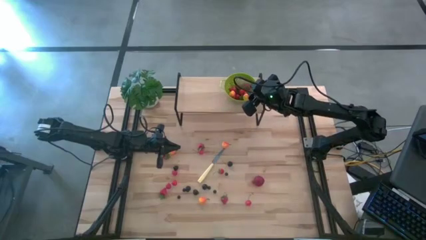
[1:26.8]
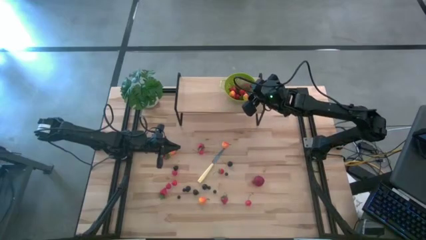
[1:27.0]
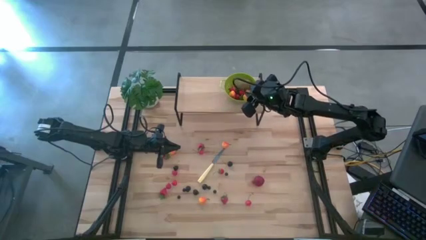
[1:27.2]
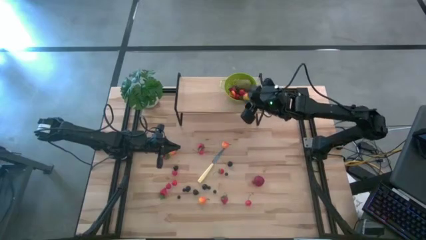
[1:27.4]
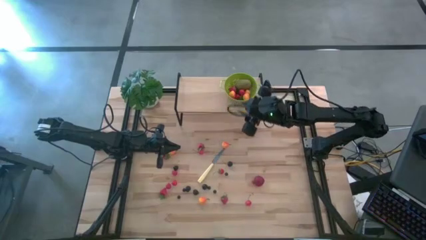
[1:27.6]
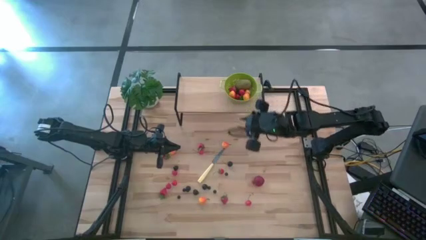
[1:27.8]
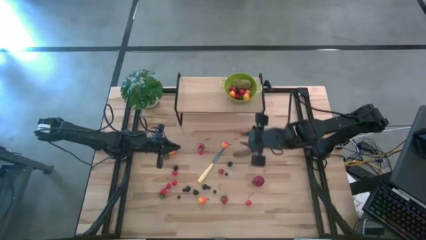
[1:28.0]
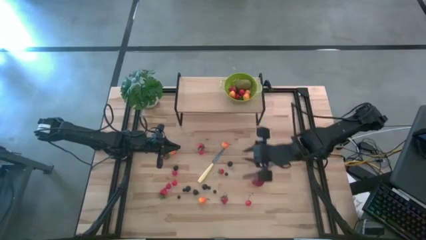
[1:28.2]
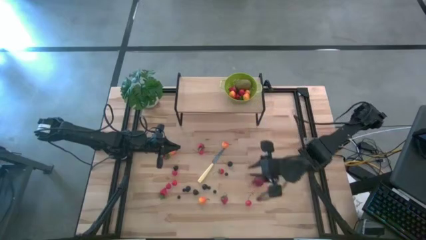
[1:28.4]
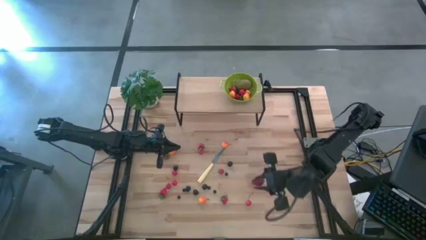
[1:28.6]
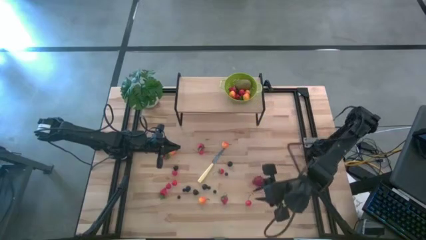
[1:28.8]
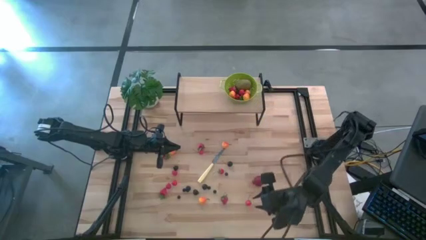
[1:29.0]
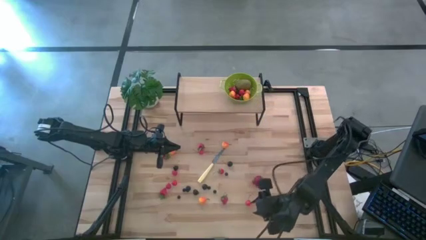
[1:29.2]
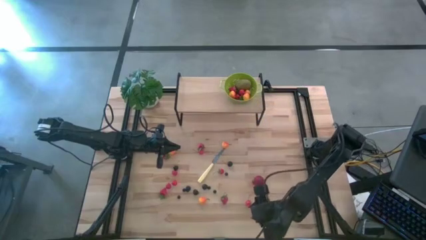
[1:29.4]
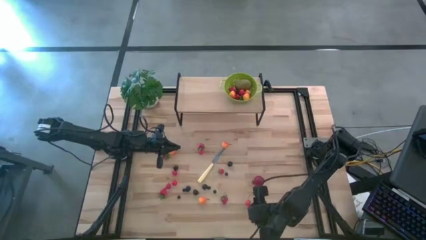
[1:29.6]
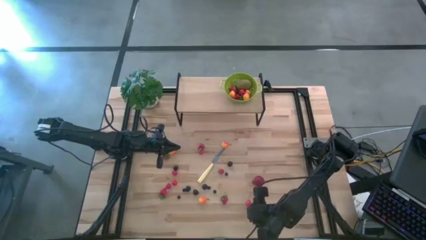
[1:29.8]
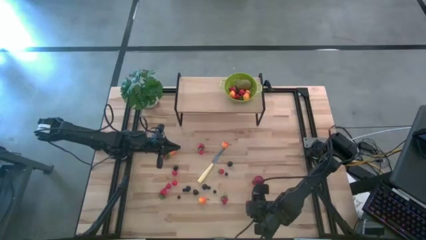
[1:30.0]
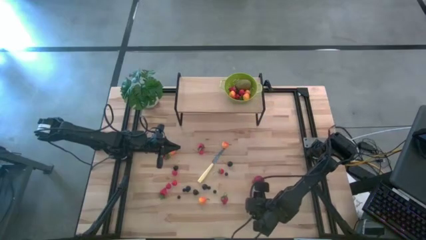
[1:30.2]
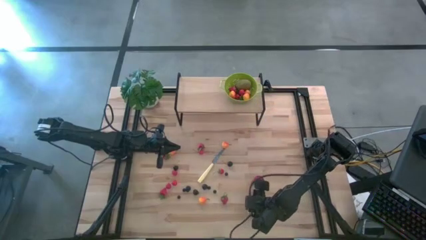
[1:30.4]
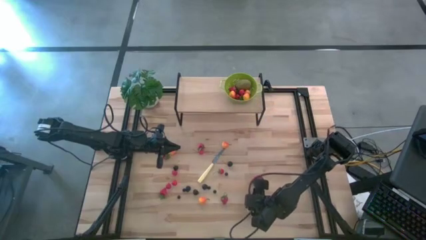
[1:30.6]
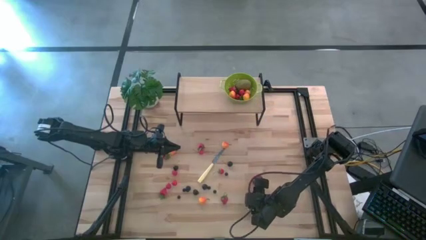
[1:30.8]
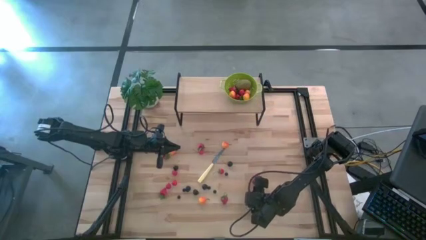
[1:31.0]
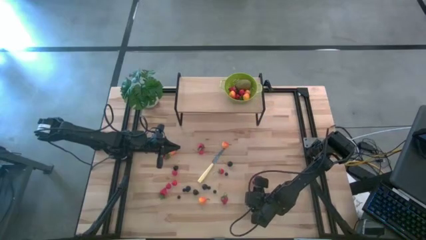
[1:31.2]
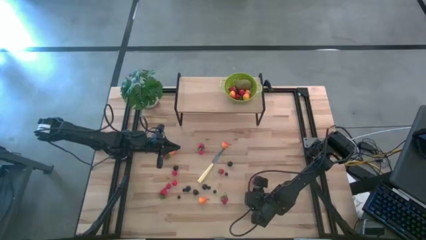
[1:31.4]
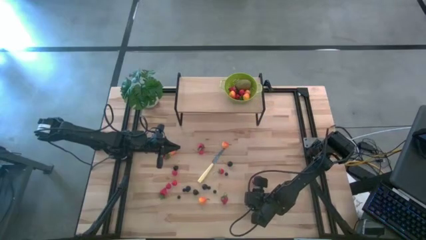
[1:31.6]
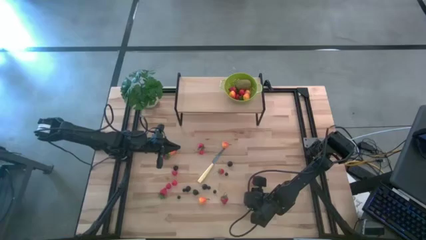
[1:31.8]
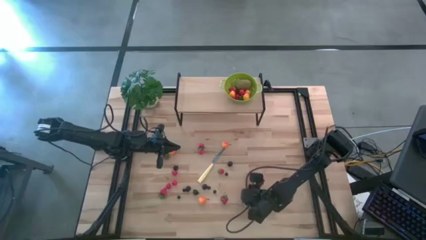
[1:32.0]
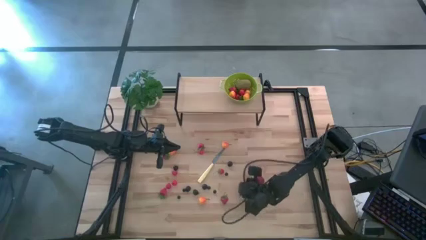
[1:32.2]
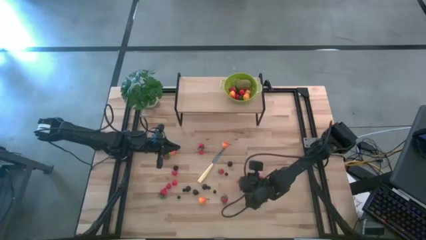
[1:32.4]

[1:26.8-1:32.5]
Task: Pick & Place Fruit
Put the red cherry into the strainer bowl

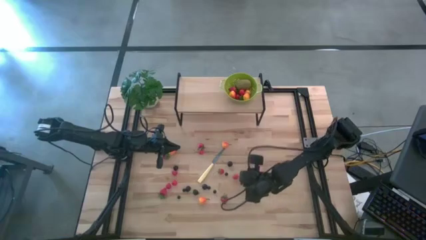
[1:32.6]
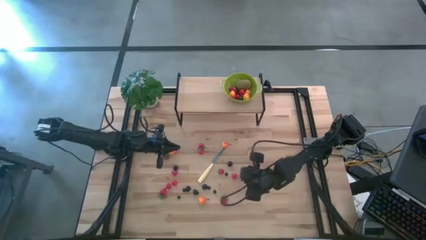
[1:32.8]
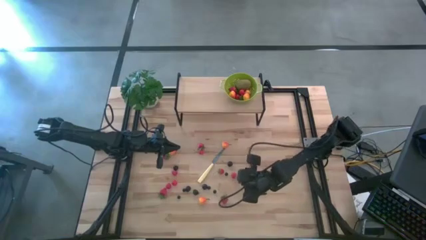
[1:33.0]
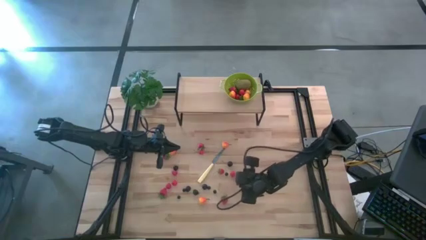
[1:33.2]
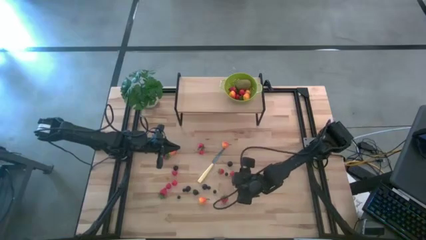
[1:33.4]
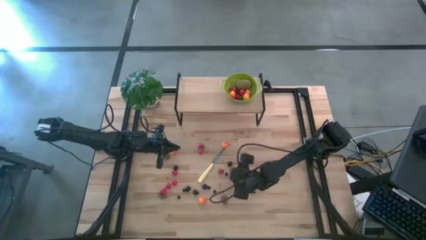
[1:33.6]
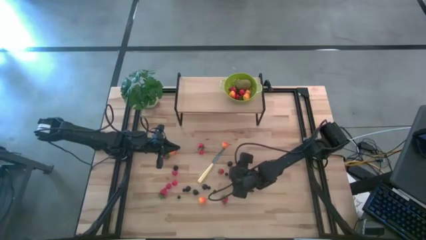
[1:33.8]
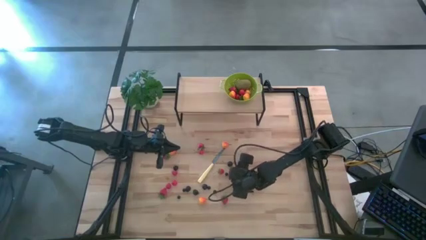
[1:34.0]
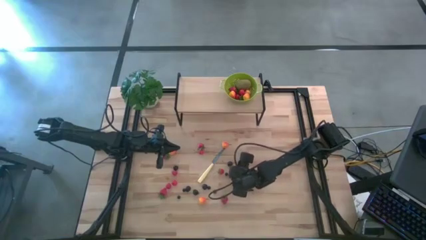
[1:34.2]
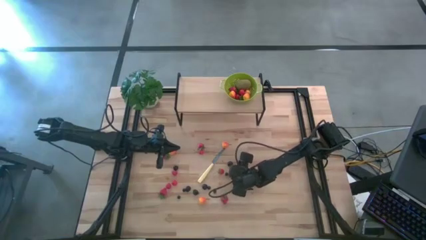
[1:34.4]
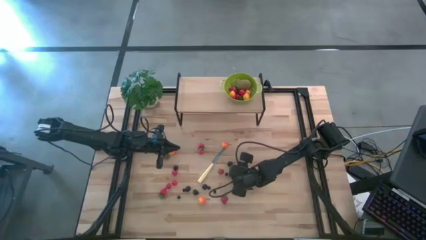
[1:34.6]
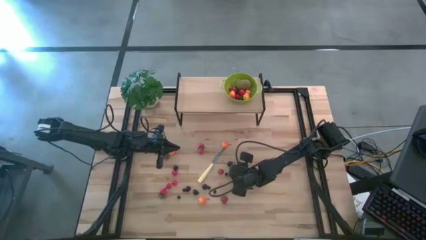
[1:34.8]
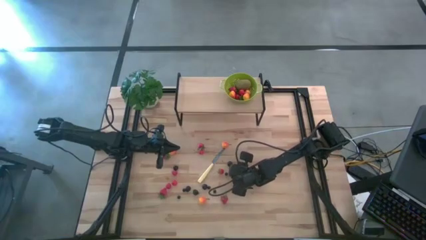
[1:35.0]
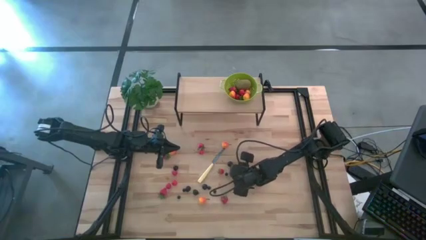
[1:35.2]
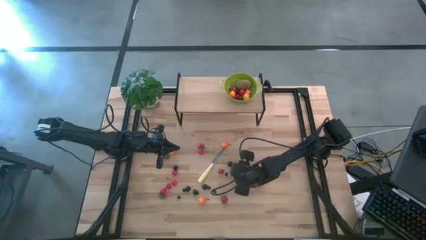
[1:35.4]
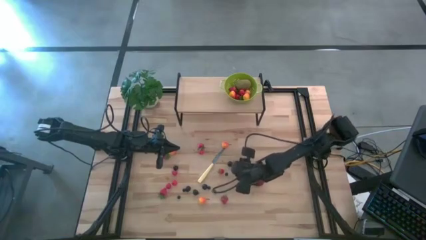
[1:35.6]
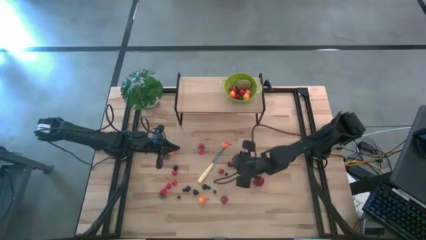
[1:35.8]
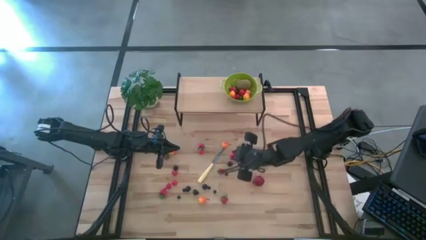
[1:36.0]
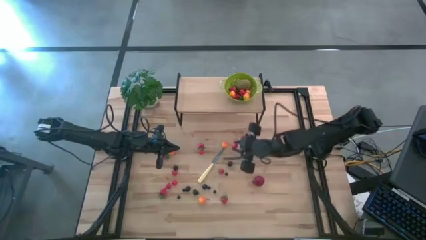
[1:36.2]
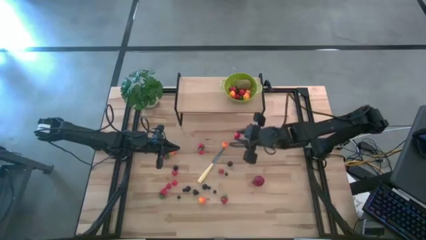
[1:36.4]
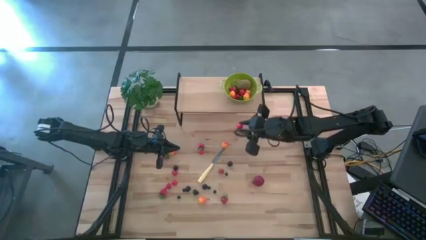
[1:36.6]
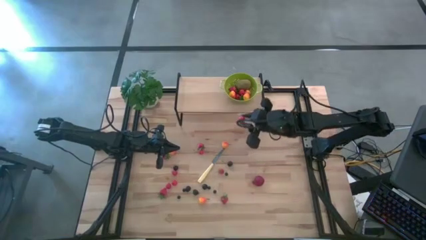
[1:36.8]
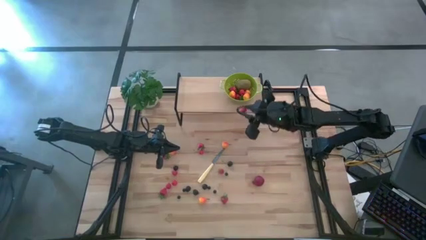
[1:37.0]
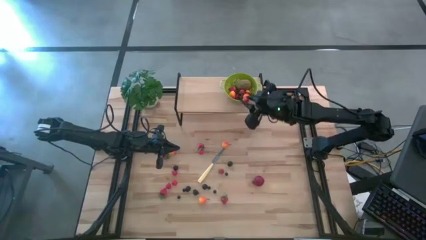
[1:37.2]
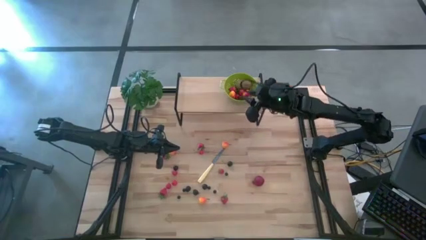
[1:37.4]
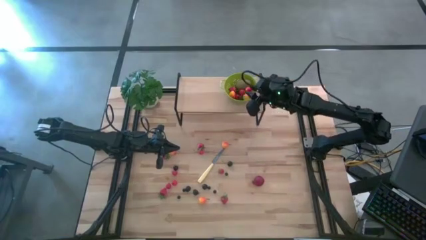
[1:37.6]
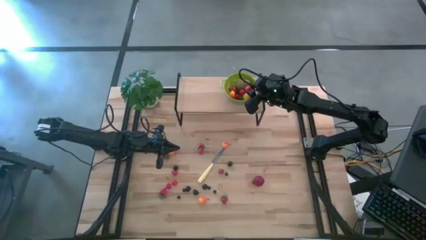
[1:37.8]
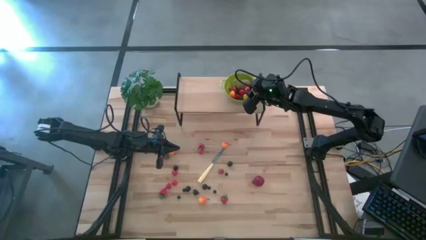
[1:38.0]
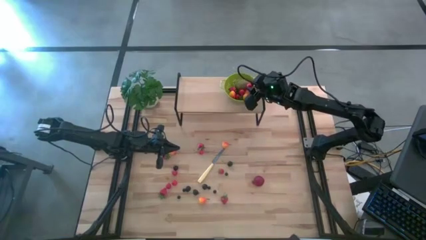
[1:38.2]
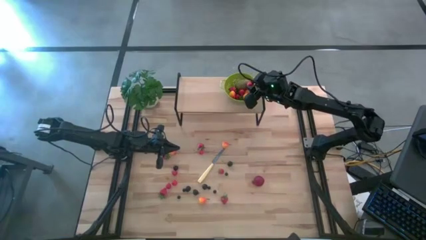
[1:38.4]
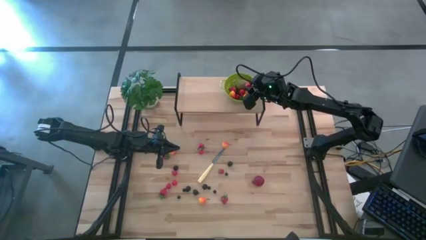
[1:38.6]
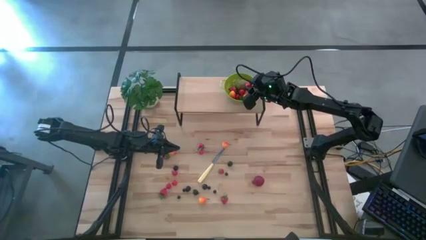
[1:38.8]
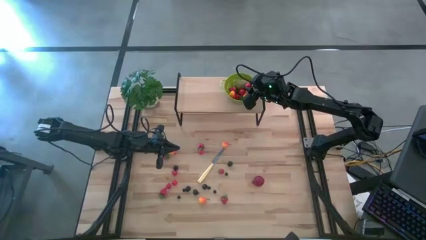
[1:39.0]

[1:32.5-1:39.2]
Put the red cherry into the strainer bowl

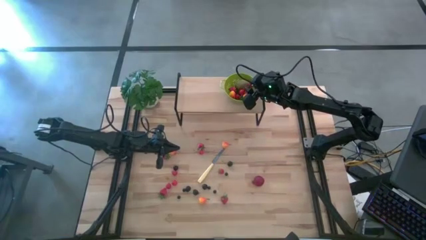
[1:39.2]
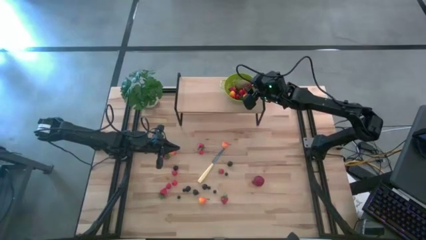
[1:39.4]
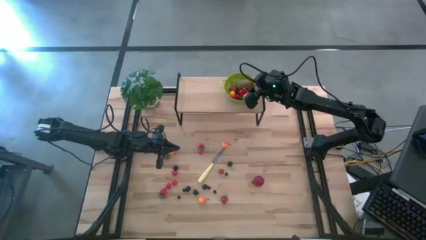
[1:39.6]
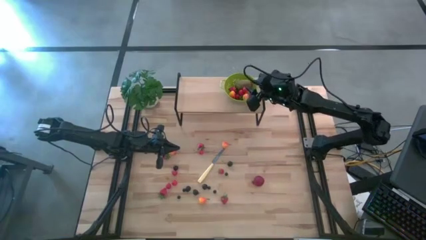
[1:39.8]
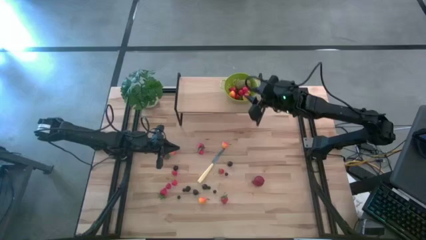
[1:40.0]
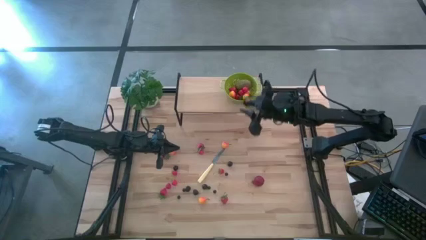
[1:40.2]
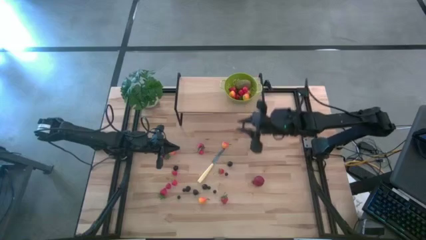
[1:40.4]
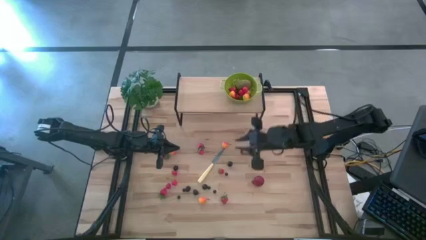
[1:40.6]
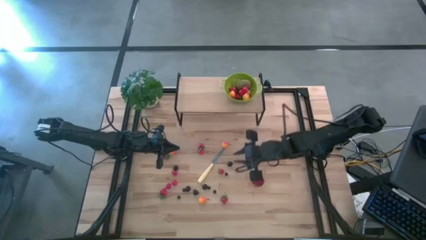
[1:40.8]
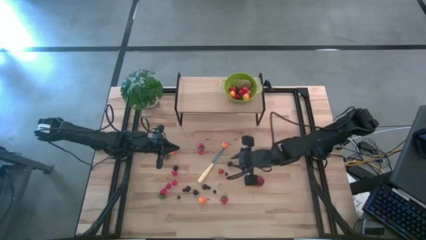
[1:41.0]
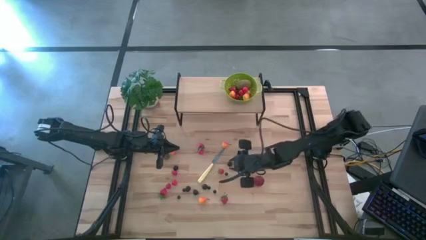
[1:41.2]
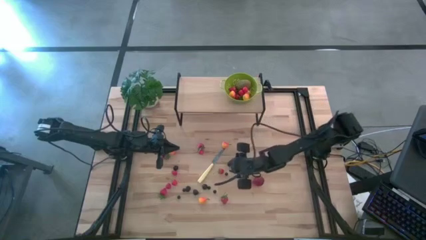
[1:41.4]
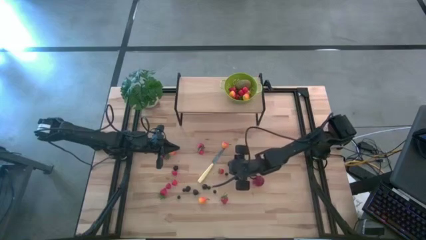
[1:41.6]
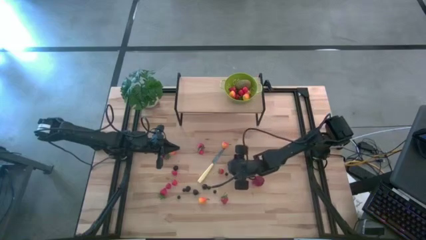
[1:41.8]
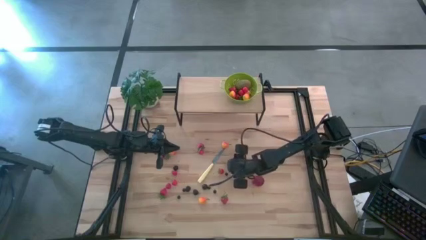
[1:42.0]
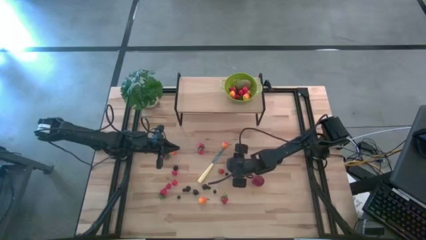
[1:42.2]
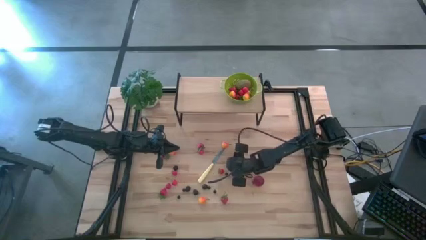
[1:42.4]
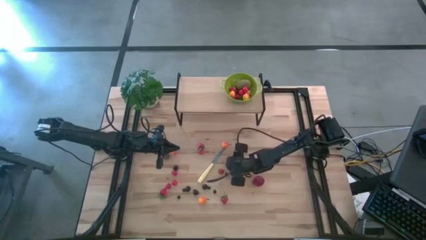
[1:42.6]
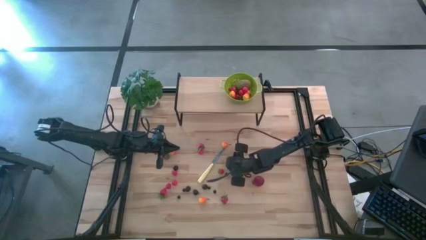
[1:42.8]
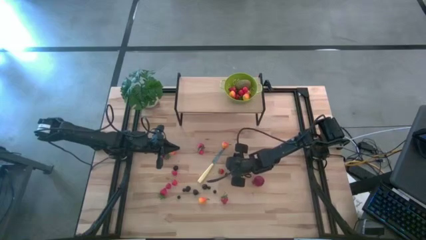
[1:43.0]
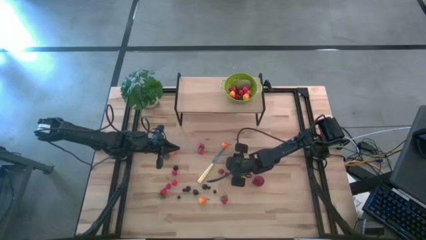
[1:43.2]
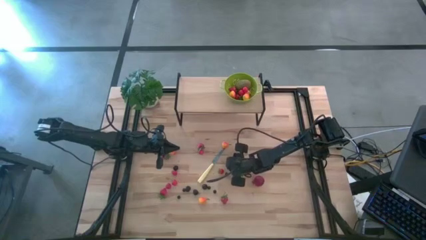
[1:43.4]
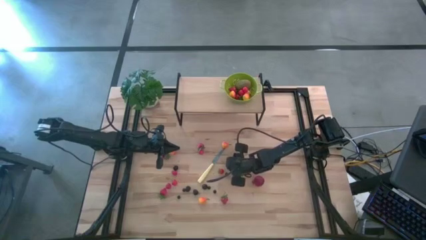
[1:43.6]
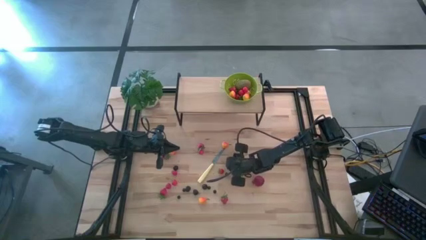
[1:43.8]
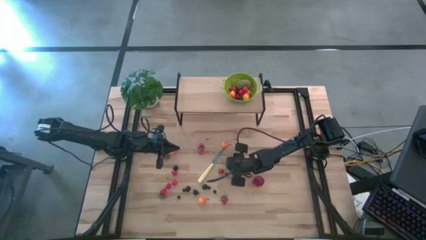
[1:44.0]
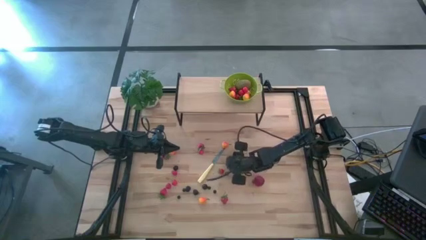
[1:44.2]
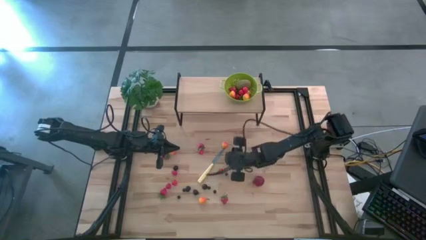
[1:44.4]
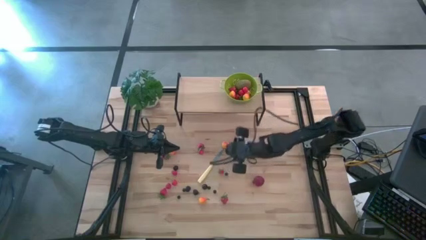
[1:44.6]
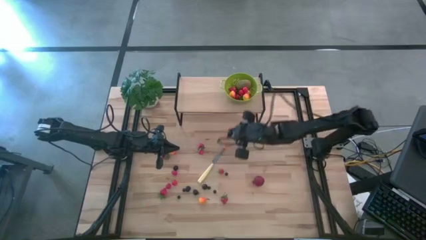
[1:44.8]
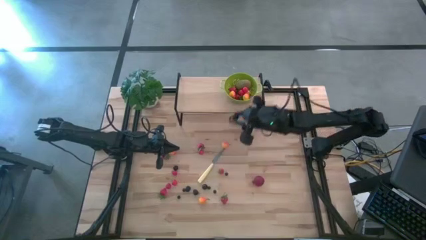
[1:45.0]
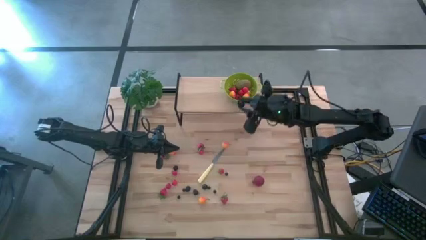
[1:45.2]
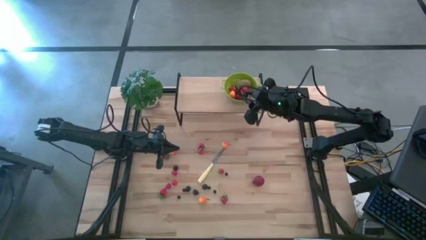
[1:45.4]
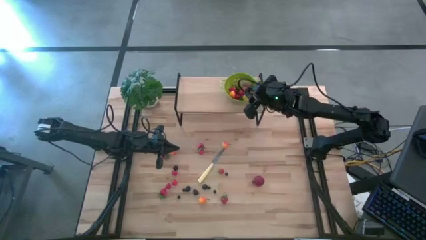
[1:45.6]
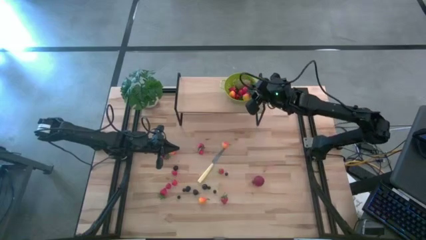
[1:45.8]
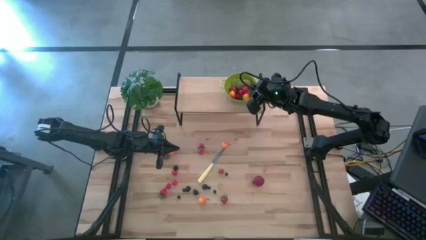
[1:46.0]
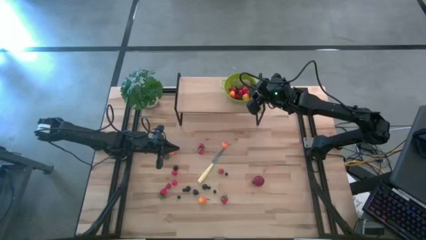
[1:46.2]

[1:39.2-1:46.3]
Put the black cherry into the green strainer bowl
